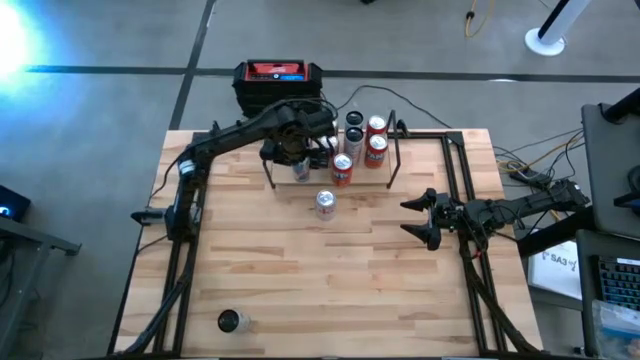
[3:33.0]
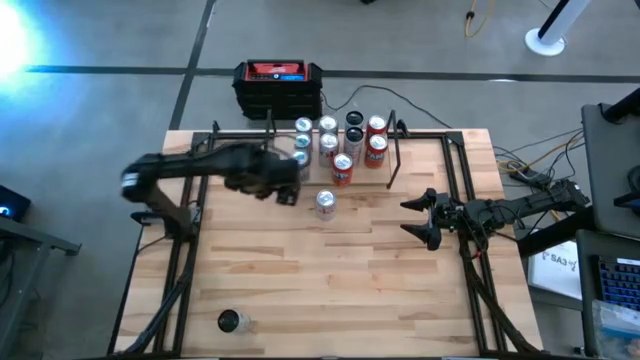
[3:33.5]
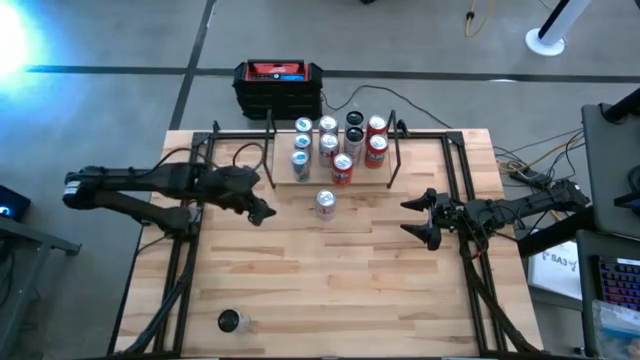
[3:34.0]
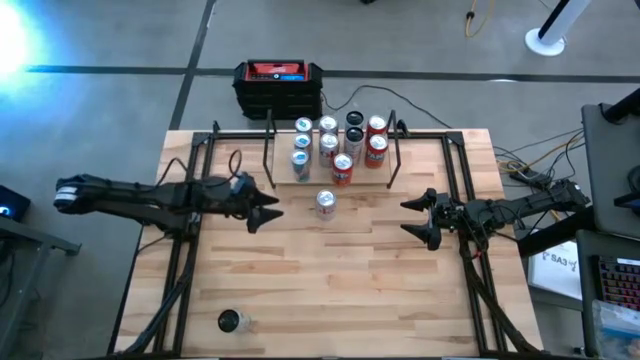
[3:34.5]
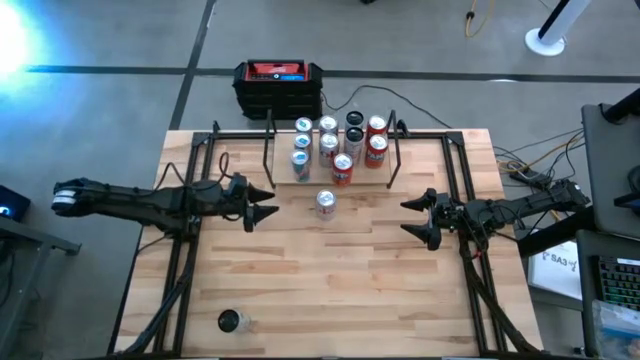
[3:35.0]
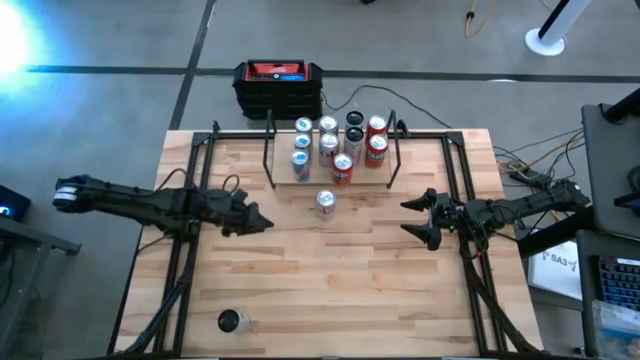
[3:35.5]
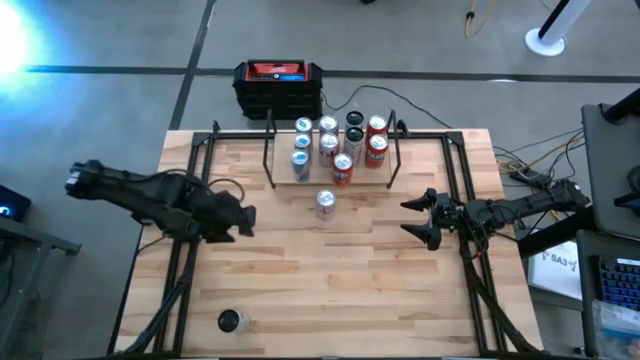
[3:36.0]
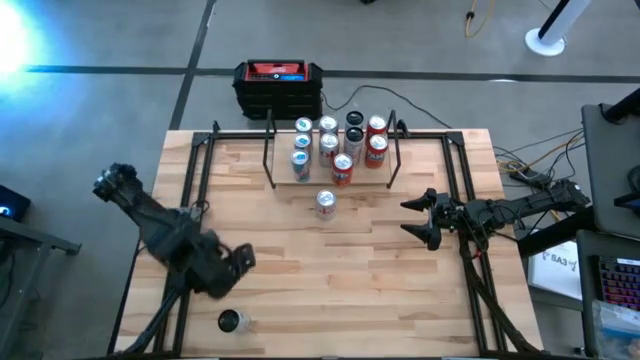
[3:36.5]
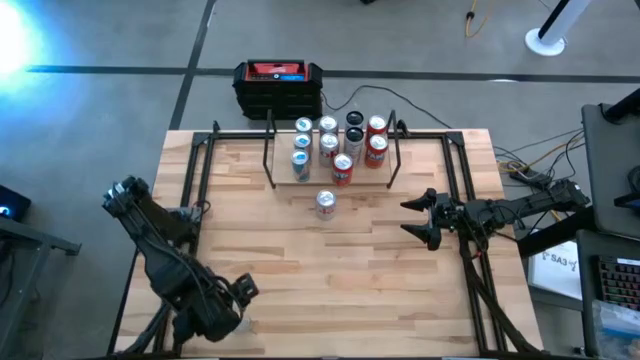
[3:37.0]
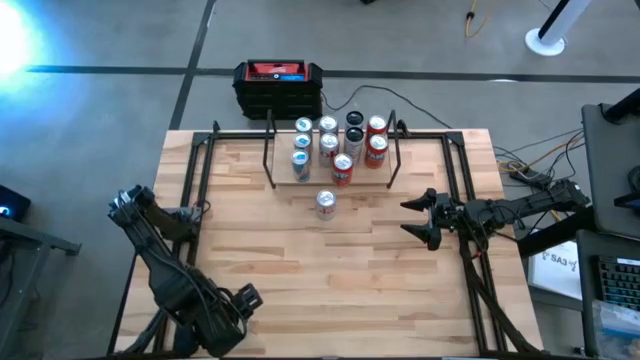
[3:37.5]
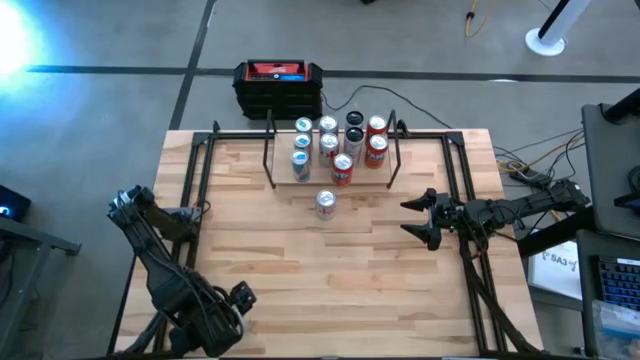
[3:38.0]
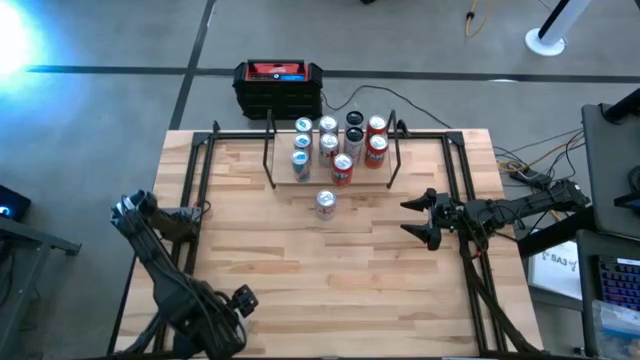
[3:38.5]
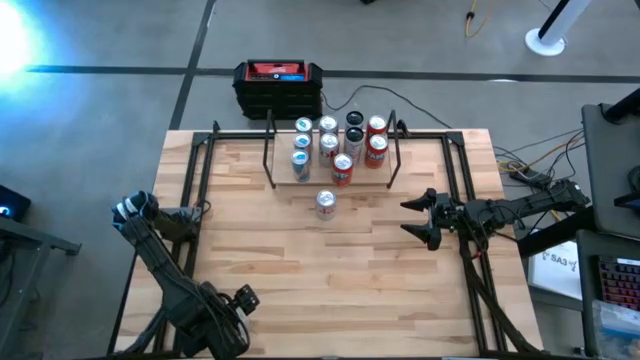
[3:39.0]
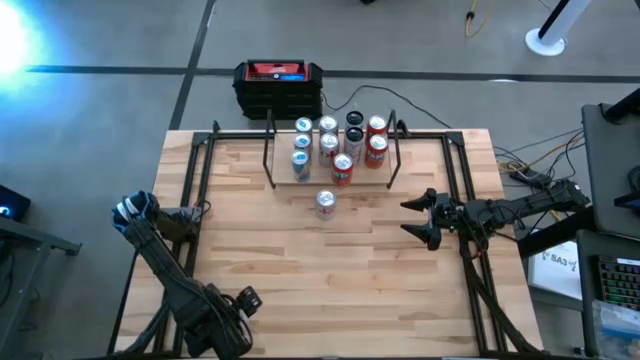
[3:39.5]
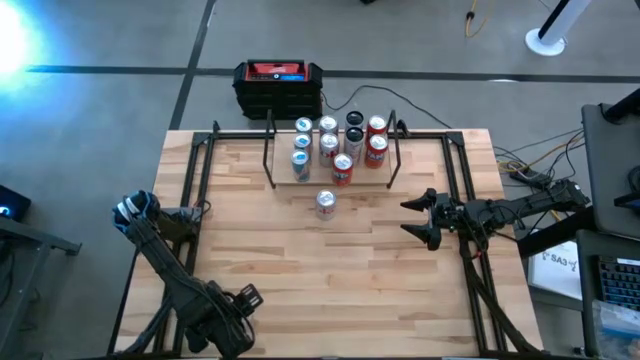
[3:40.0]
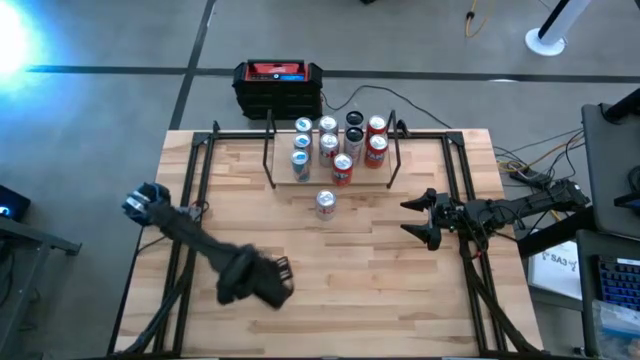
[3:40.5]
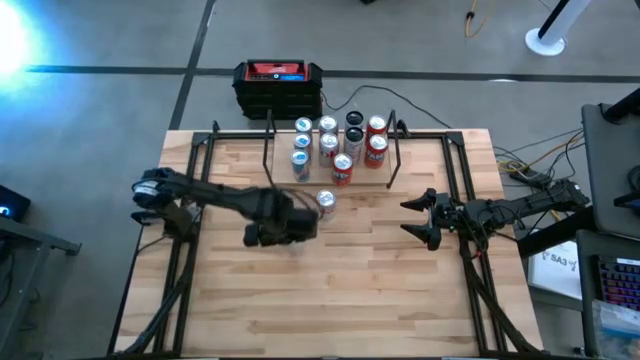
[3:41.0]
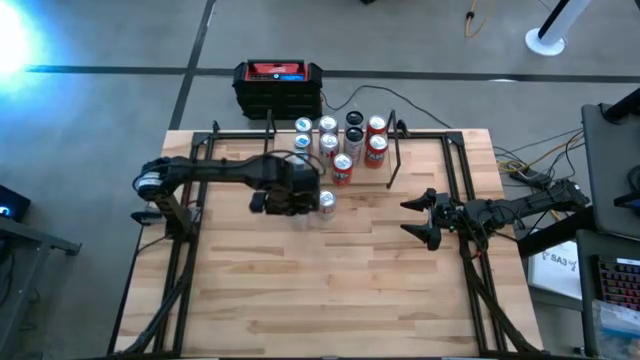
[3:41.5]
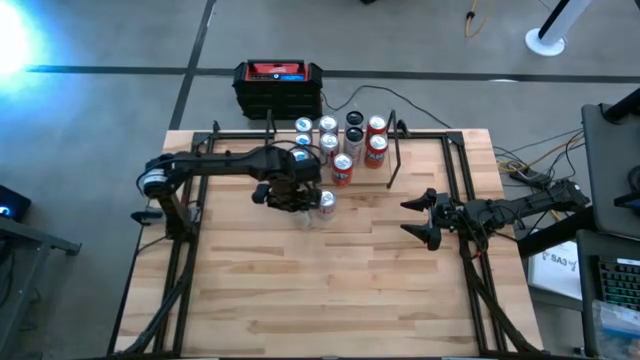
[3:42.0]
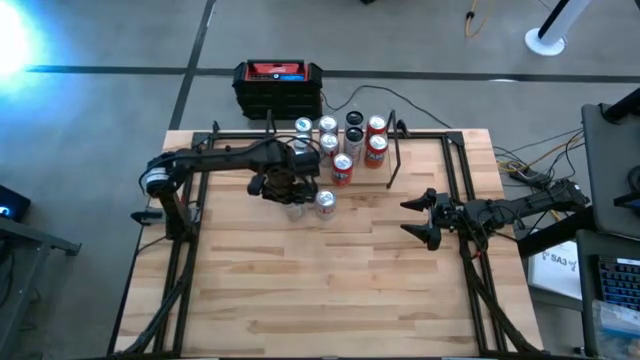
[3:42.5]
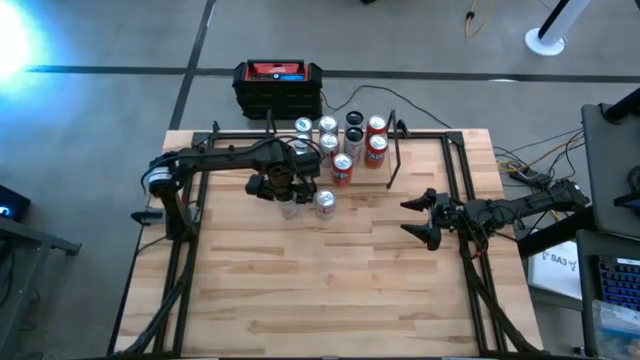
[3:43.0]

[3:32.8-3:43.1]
Task: Place canned beverage on shelf
Move the white pink soda can to the center of the table

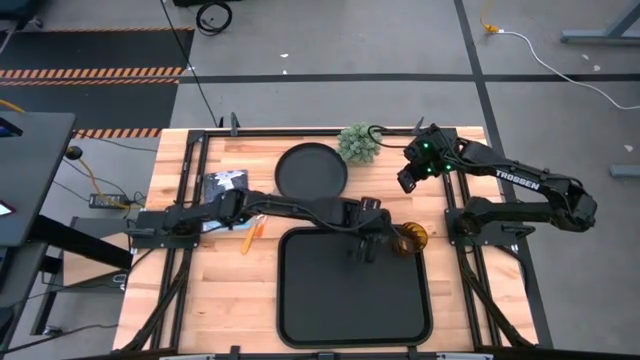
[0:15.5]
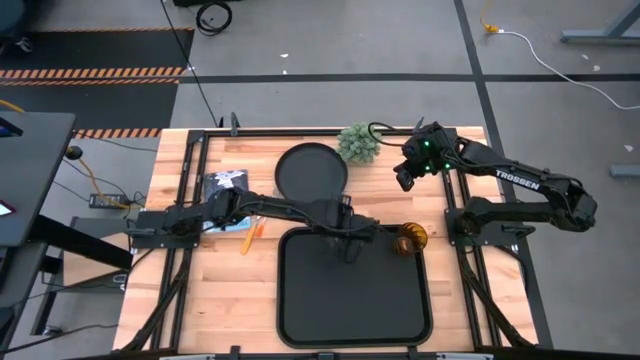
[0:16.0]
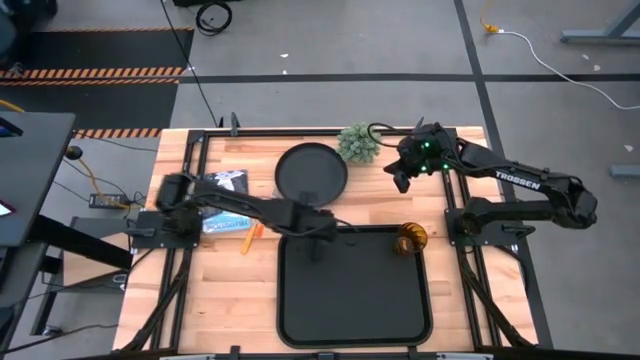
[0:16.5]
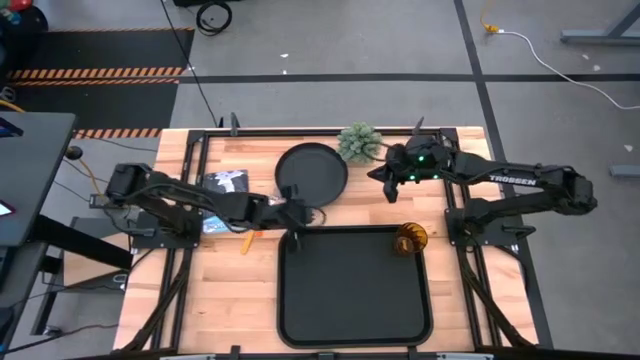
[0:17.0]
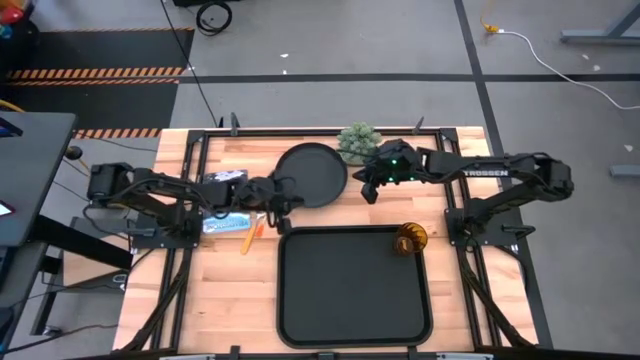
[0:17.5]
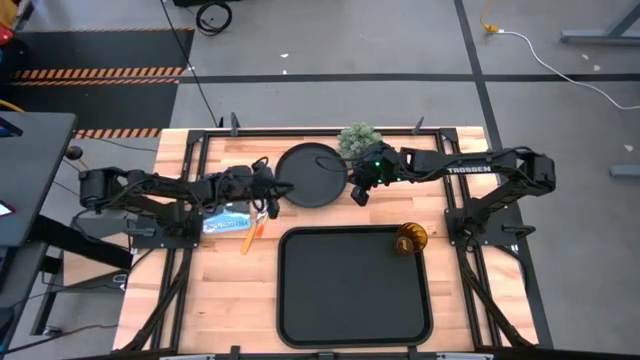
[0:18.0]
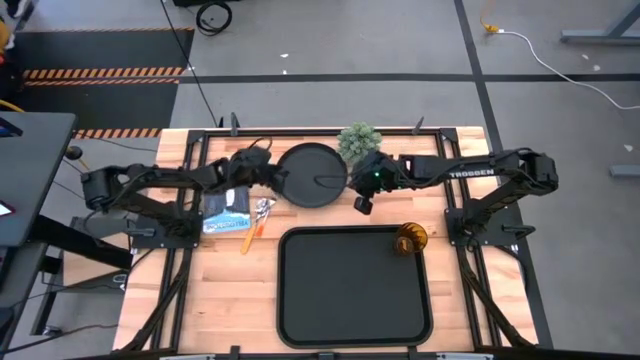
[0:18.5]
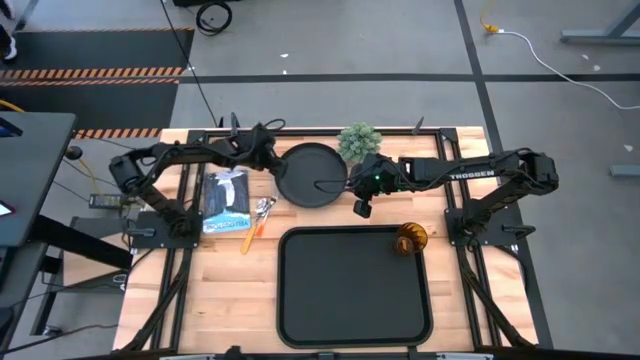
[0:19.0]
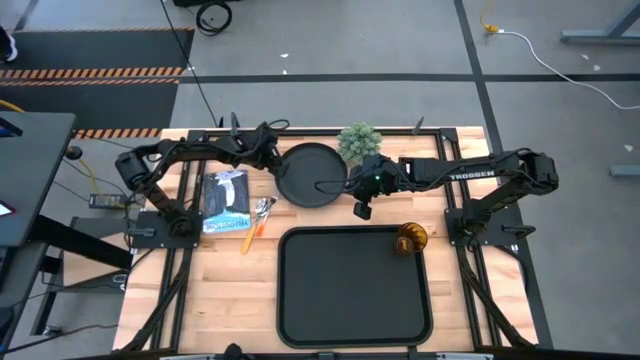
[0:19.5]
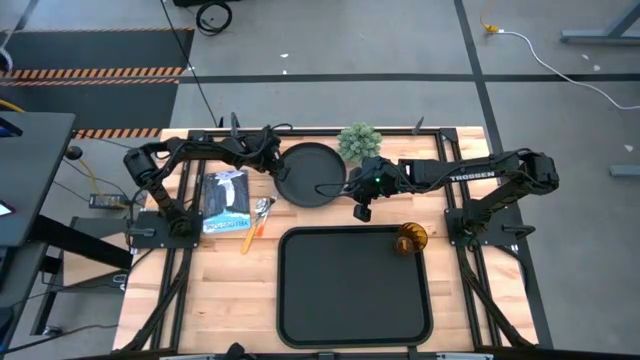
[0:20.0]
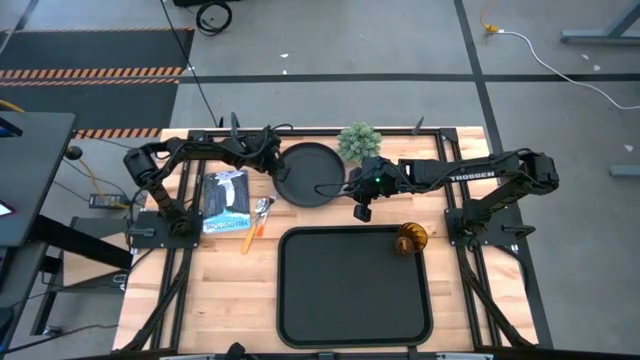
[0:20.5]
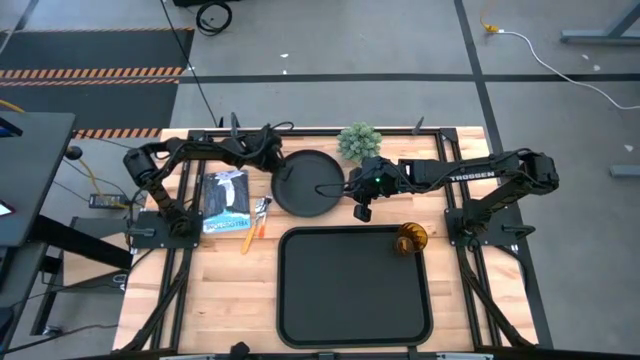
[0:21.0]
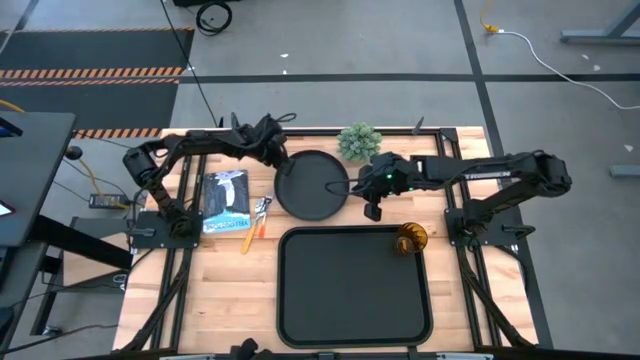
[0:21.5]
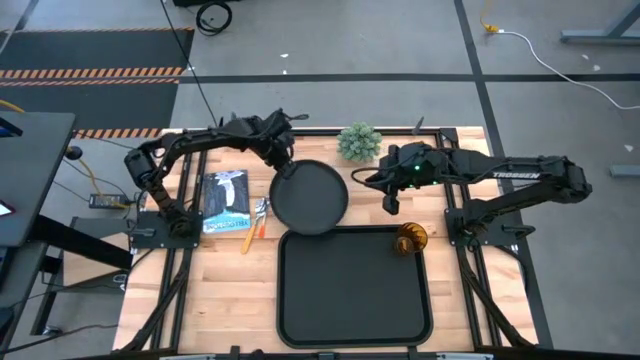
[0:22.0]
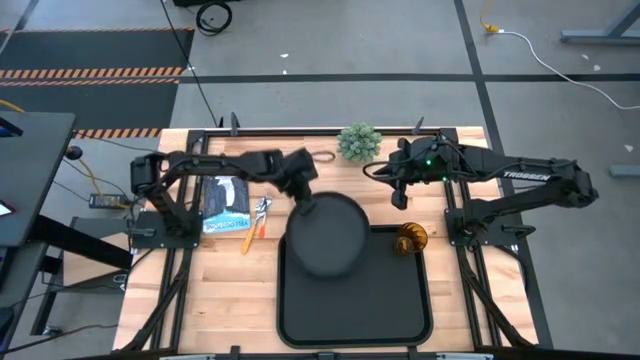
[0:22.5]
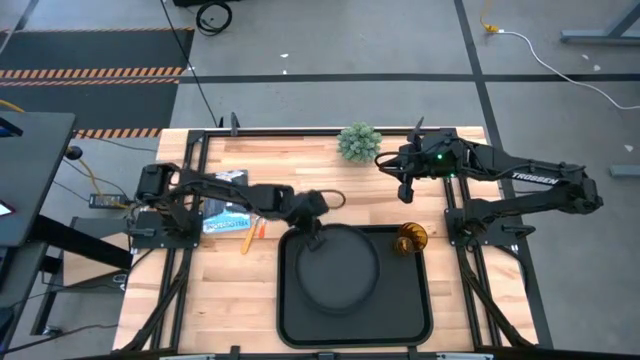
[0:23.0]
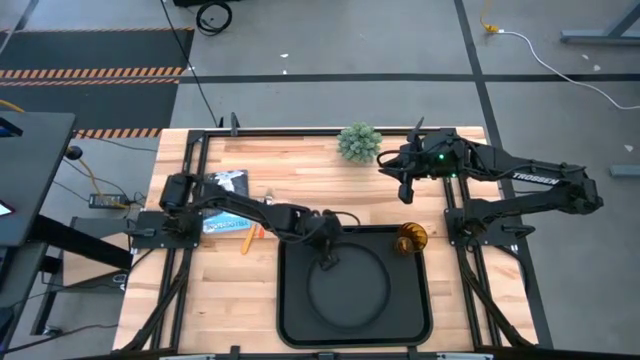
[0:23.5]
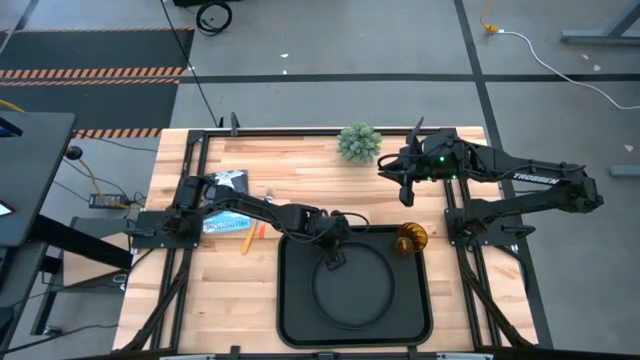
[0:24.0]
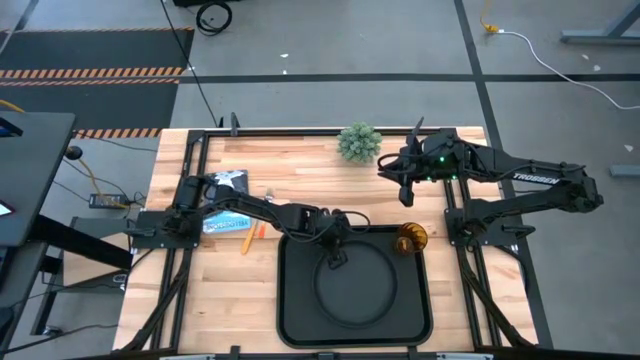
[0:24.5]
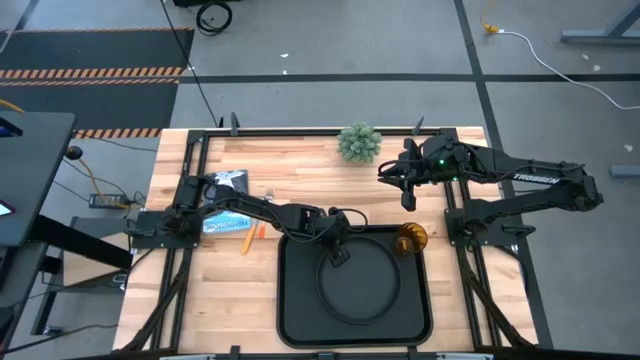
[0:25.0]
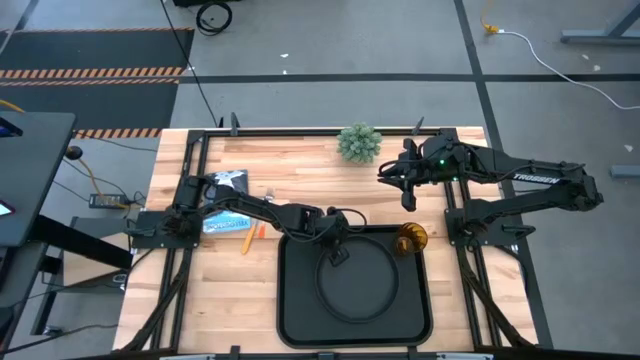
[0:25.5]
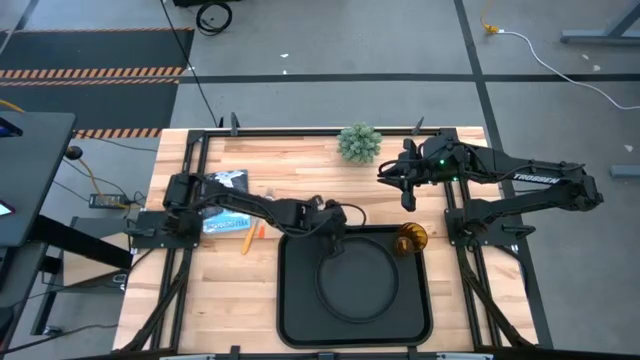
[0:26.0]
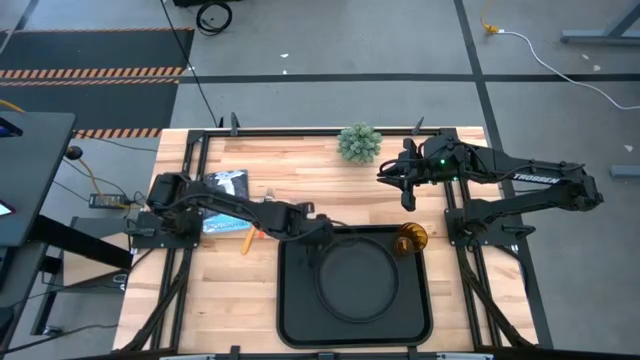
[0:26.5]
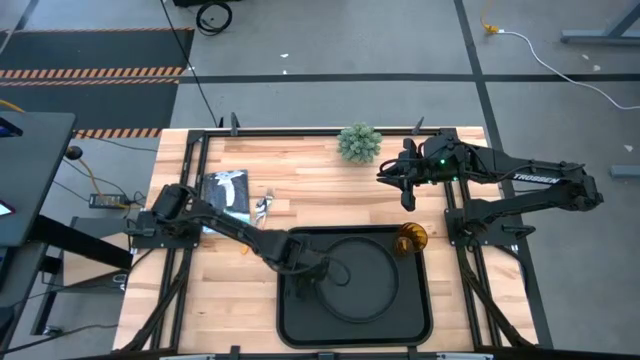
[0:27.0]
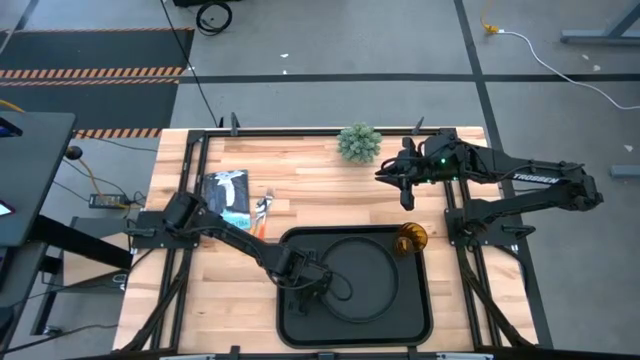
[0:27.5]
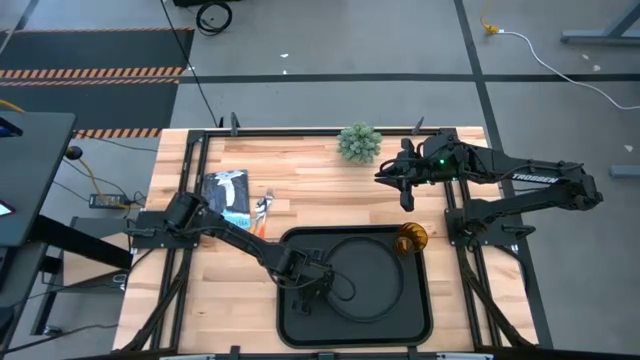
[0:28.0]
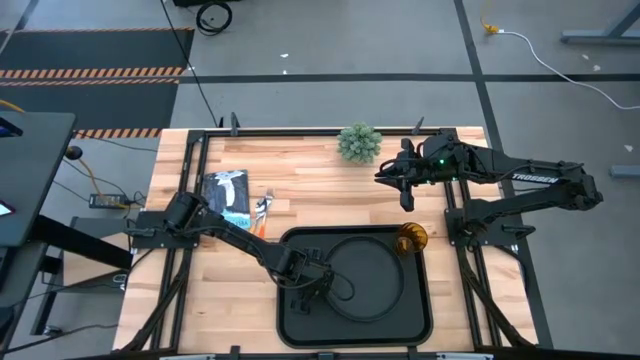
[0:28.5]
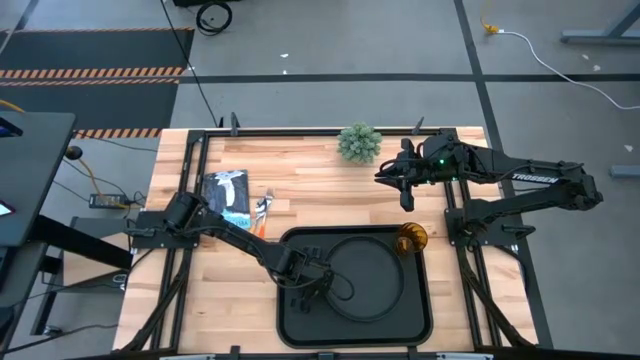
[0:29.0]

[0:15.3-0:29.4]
Task: Pick and place plate/cup/fork/spoon on tray
Put the black plate to the center of the black serving tray
